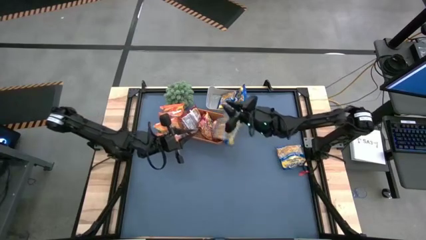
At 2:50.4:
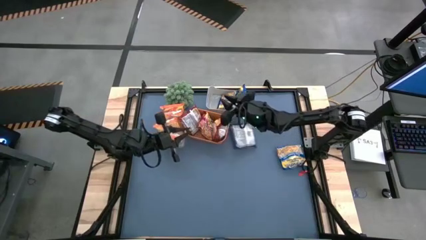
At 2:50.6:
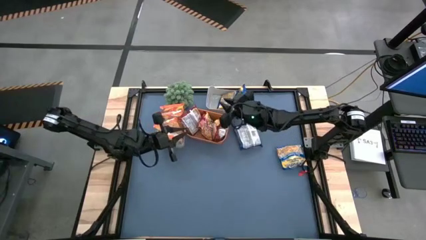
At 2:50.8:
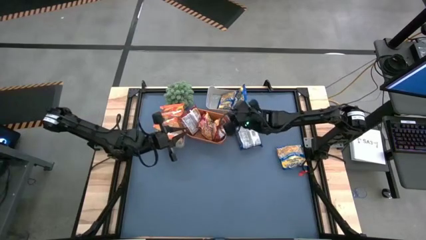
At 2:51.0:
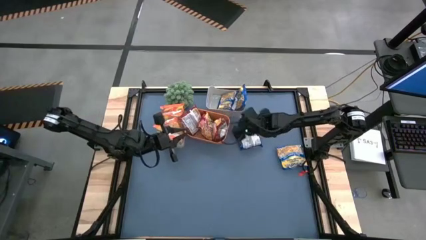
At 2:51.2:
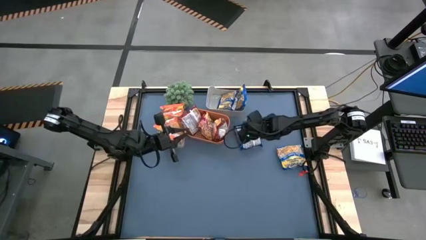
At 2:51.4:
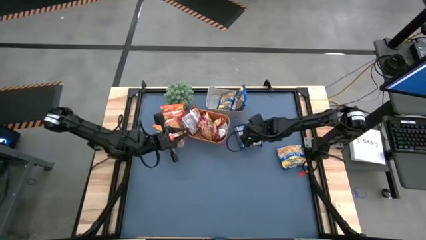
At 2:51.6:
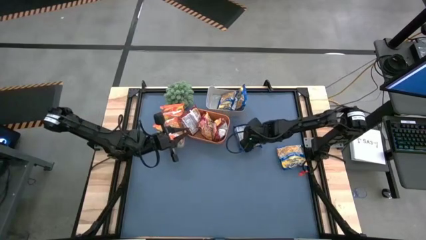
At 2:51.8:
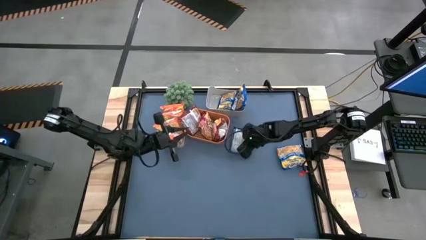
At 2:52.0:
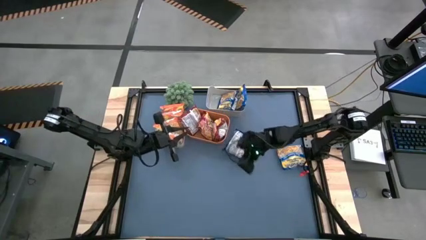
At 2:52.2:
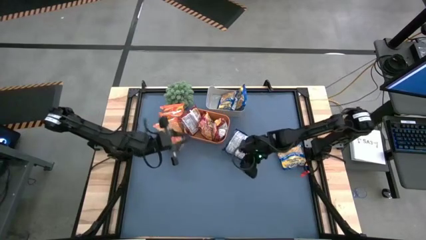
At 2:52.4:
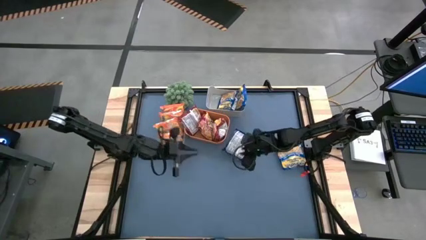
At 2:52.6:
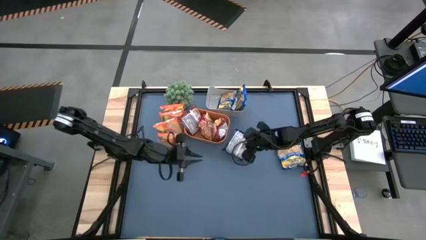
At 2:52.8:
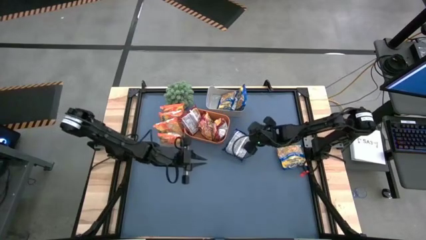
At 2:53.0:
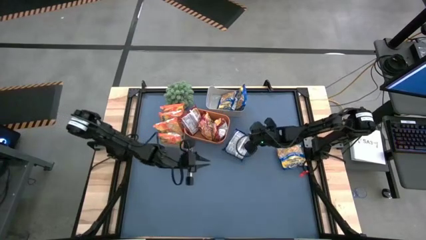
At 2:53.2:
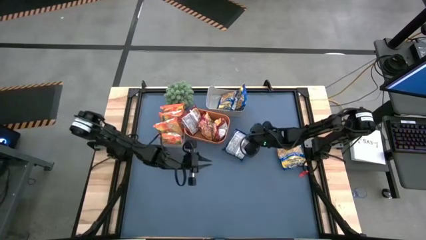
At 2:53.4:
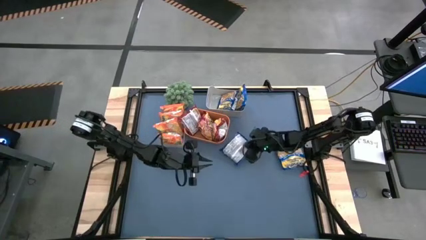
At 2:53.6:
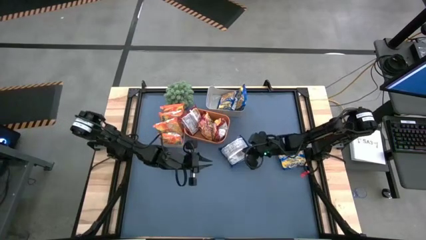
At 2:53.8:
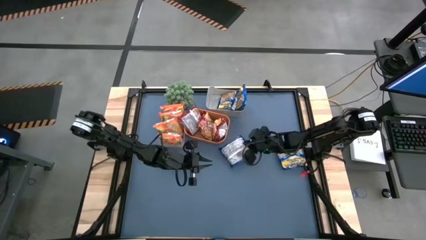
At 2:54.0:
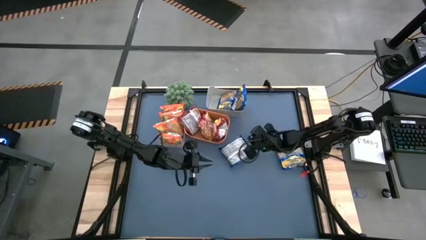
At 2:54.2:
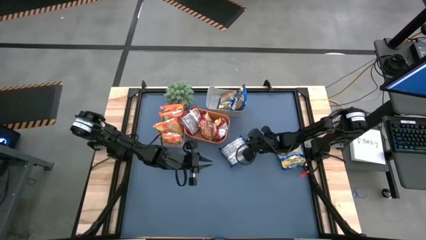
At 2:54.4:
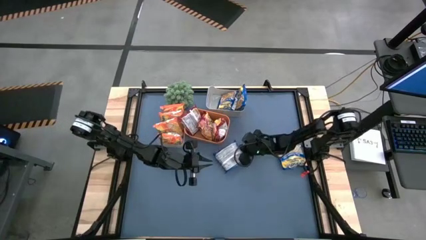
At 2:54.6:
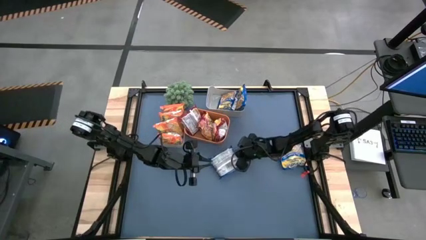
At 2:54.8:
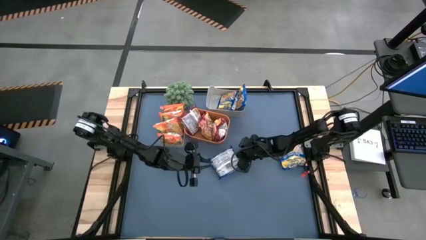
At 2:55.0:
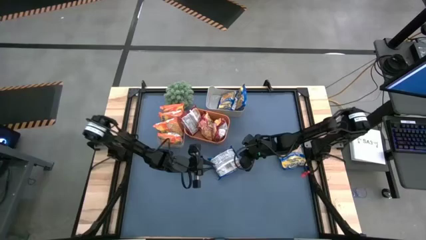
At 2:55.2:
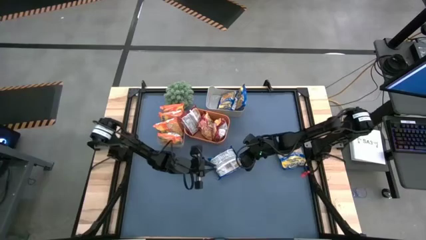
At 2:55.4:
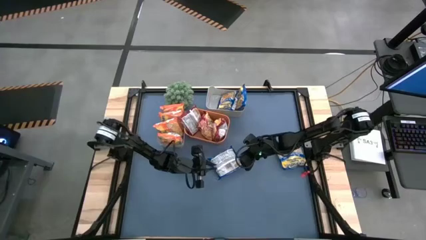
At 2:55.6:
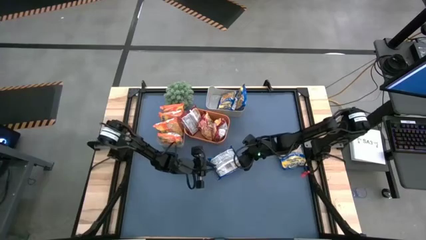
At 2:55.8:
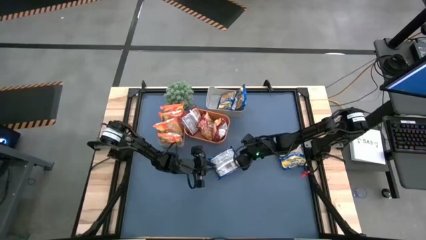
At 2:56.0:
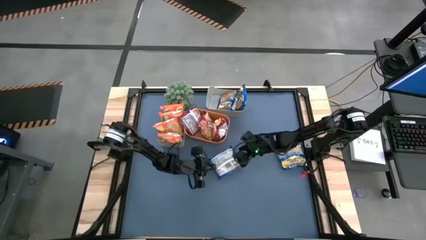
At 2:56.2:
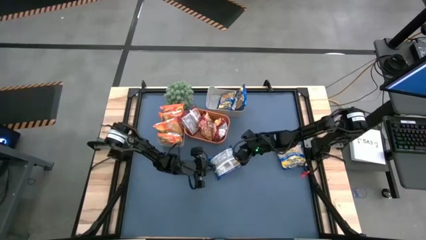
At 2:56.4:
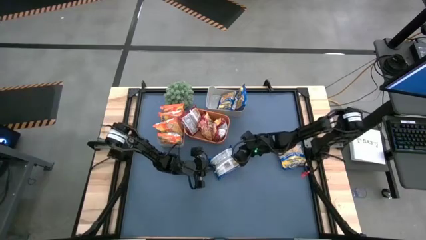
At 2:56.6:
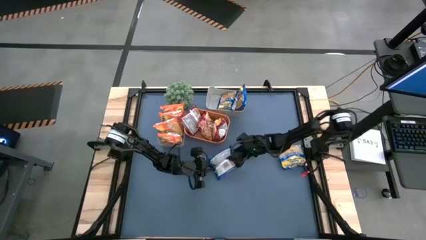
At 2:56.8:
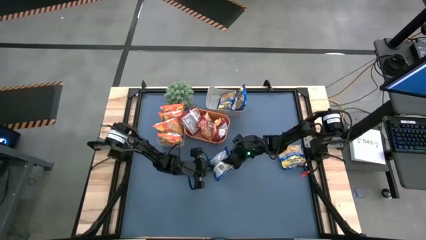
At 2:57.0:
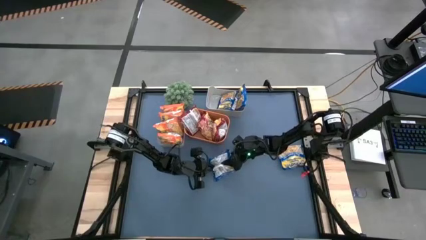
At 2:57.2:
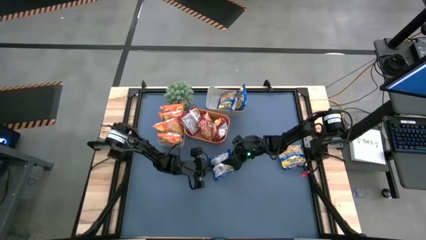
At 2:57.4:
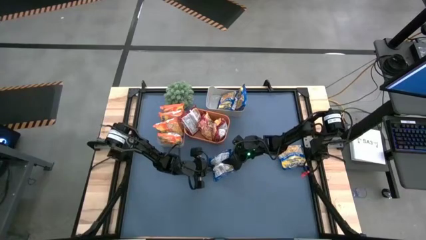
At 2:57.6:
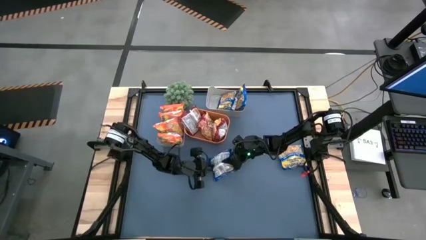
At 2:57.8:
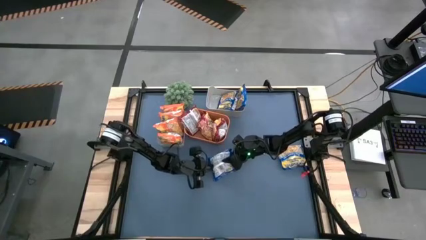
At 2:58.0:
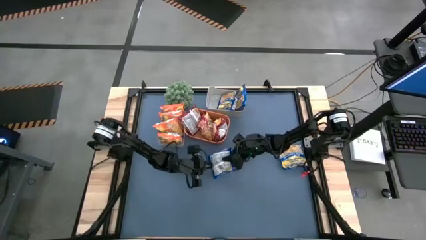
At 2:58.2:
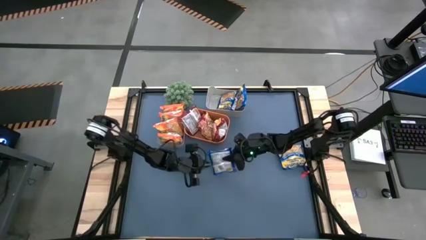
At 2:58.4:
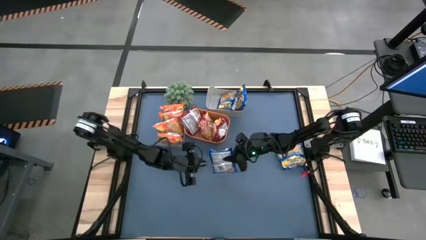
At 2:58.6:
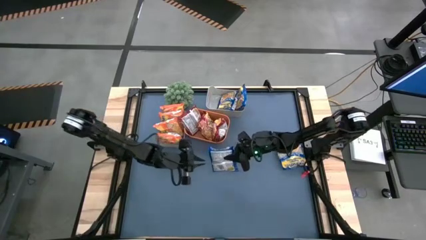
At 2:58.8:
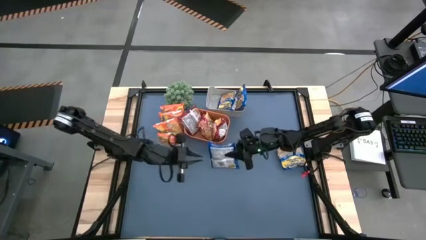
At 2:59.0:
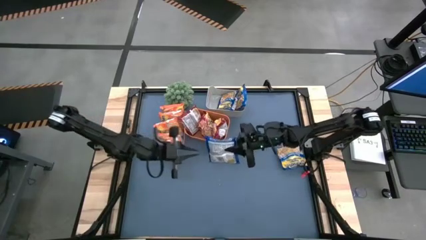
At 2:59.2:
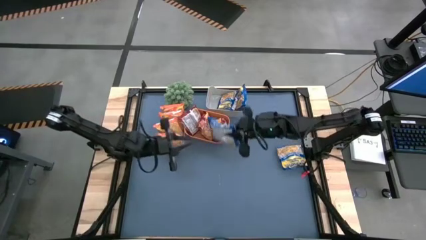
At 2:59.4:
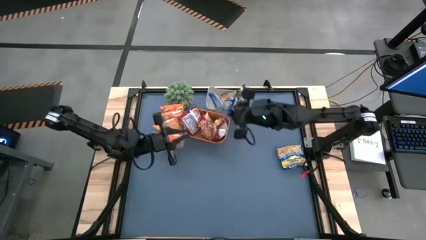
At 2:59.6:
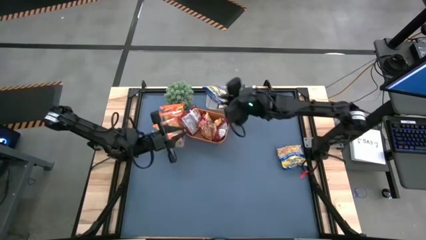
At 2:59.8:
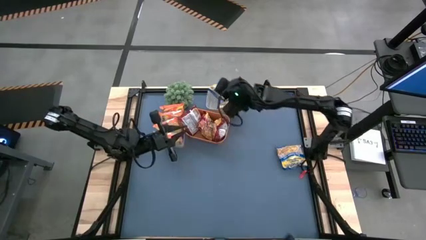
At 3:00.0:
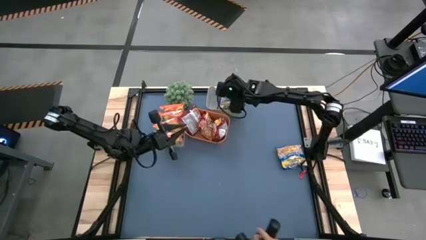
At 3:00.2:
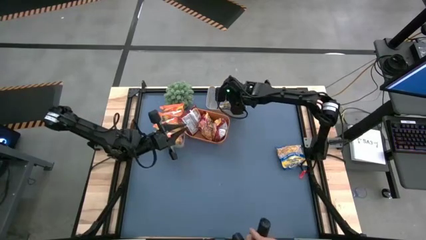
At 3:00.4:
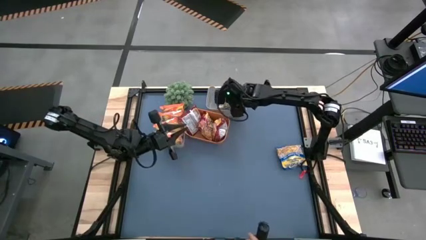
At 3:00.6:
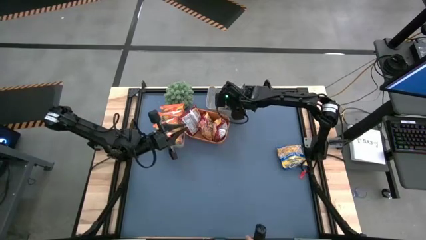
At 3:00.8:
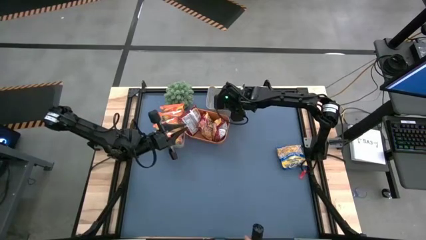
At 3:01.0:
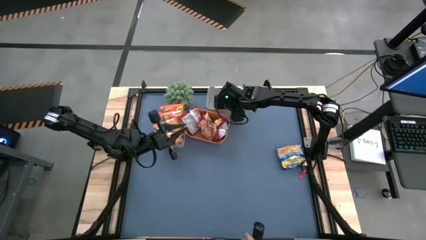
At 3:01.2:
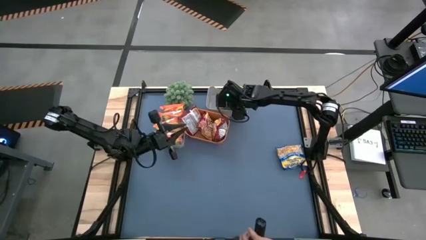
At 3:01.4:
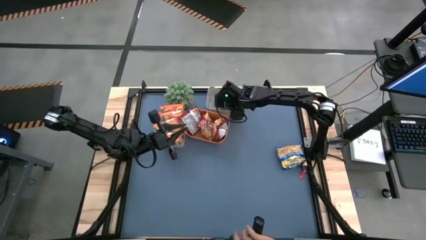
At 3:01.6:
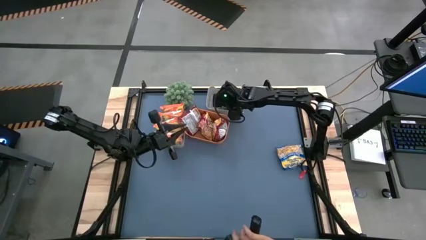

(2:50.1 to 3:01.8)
Task: Sort Maruchan noodles
Put the blue noodle pack into the gray bin

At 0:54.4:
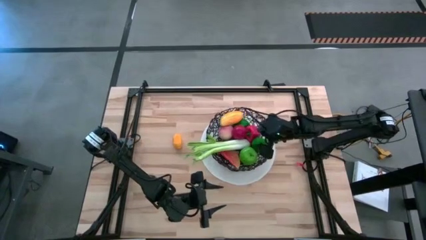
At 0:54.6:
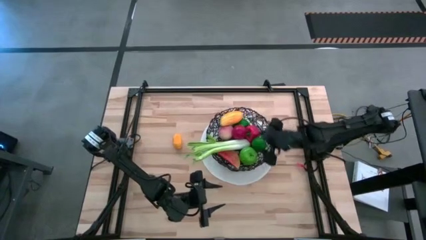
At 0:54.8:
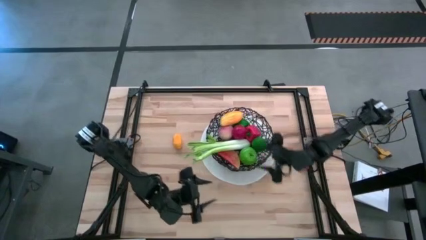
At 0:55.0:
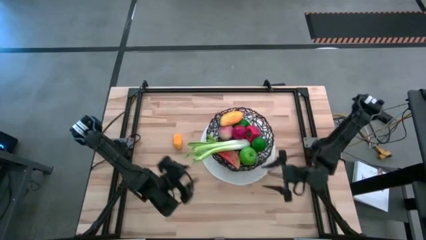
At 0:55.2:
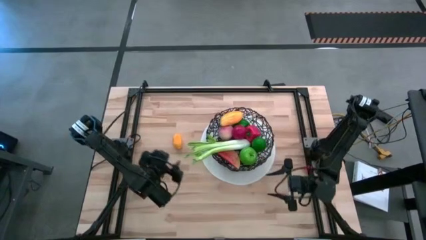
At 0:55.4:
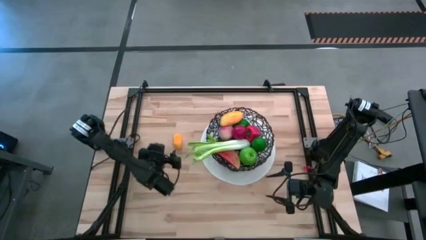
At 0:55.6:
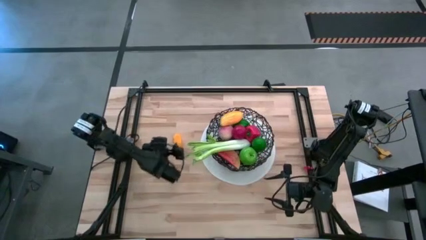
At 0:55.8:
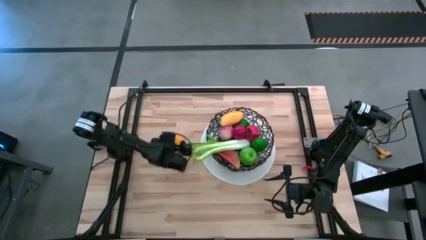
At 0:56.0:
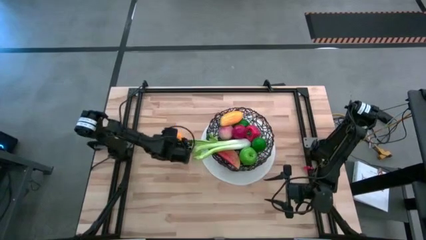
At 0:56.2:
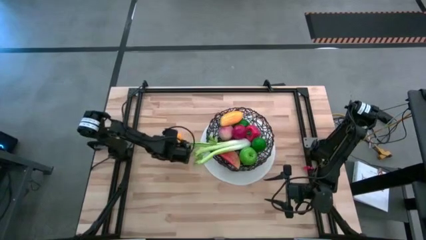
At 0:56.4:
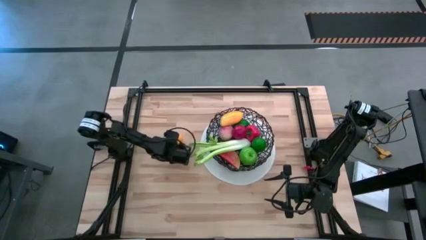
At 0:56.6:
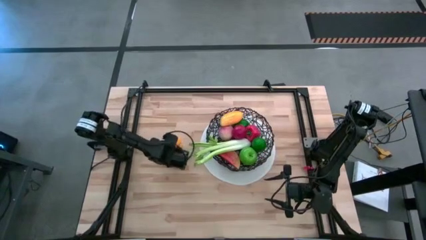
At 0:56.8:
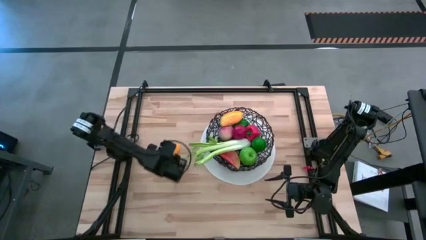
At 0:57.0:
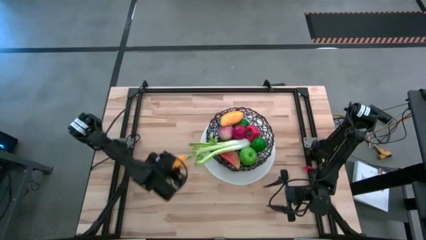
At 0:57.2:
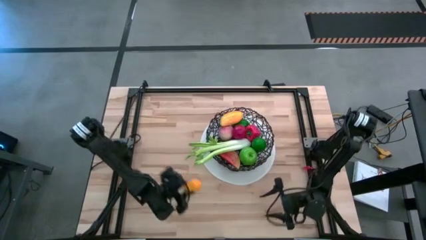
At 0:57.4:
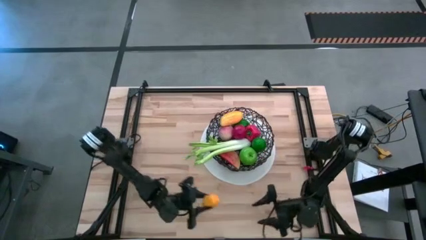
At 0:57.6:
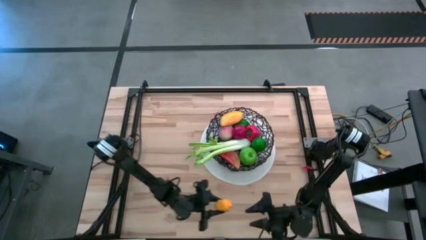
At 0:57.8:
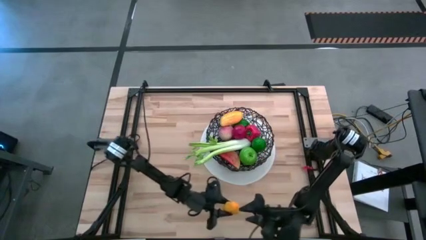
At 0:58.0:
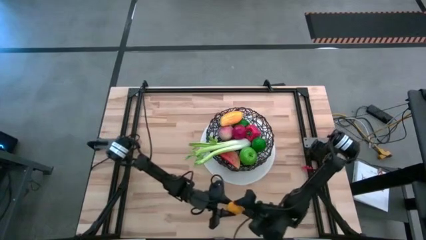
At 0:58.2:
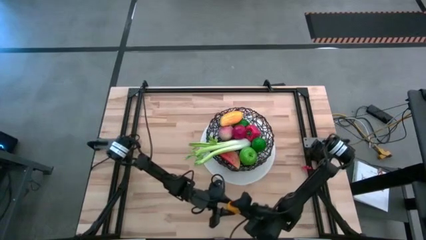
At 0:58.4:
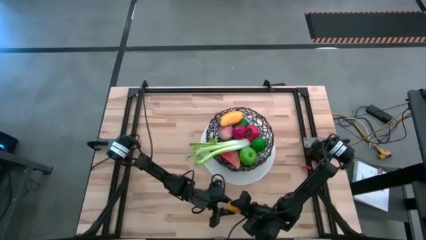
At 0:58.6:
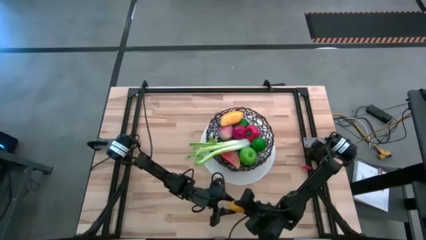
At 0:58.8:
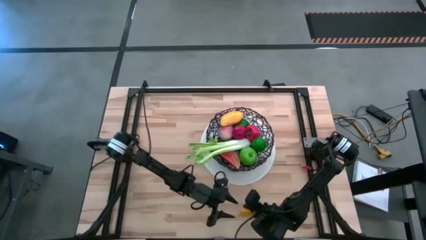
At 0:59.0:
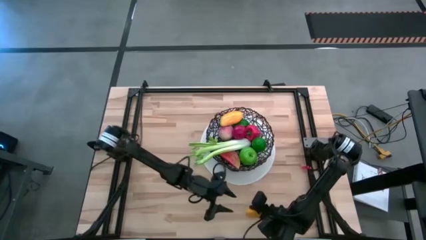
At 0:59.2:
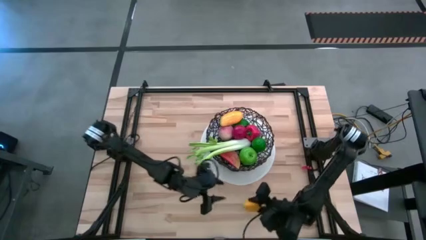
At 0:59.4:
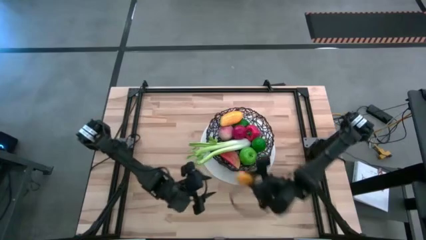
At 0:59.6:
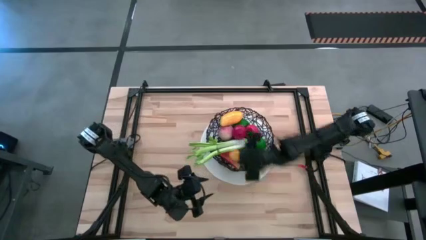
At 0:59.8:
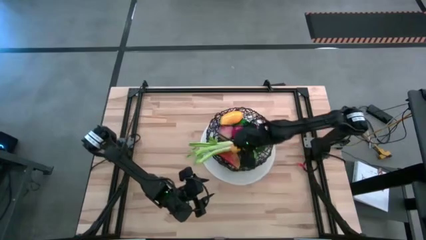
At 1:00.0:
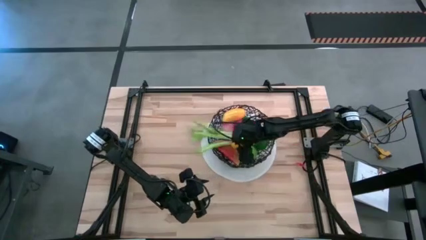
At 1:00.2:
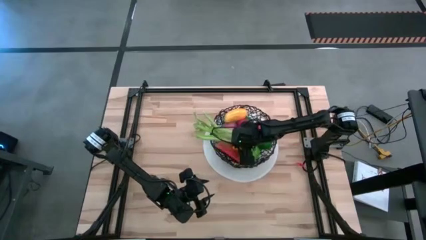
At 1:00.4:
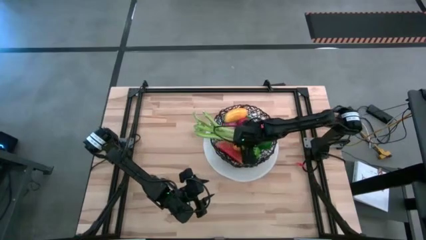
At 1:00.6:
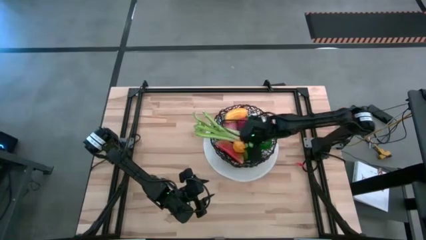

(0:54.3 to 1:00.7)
Task: Build produce basket
Put the yellow lemon into the wire basket
